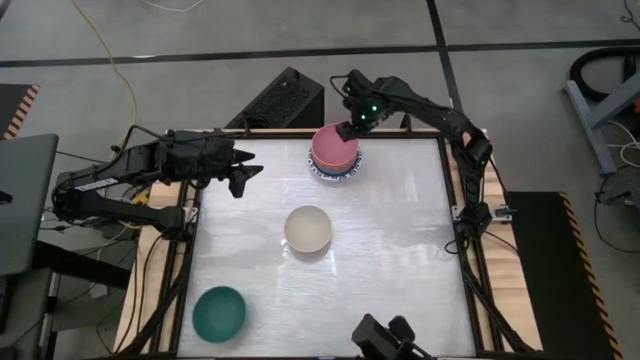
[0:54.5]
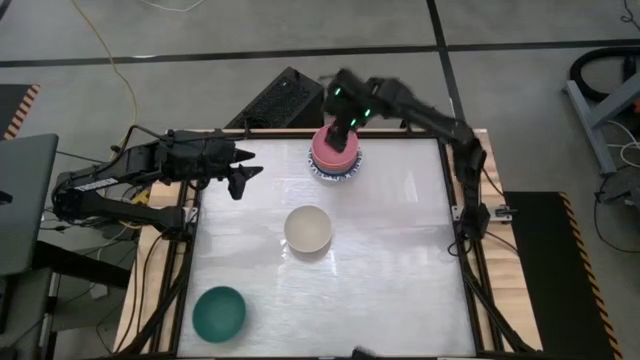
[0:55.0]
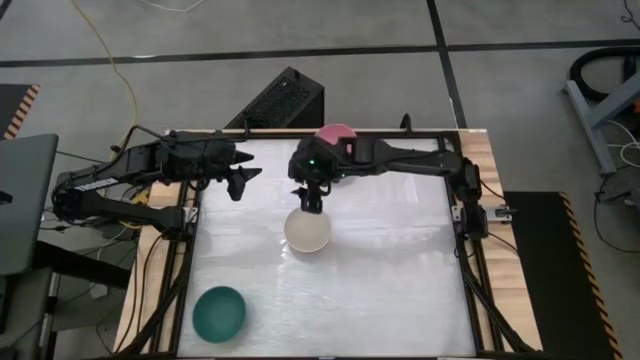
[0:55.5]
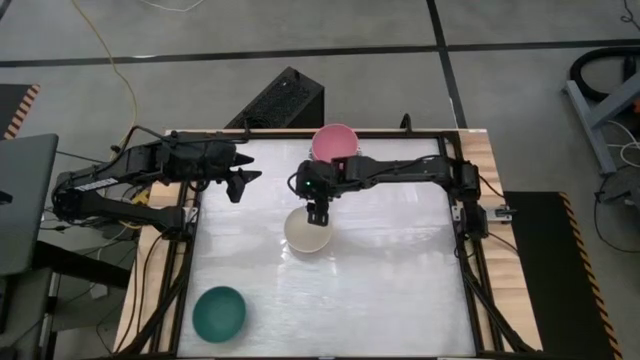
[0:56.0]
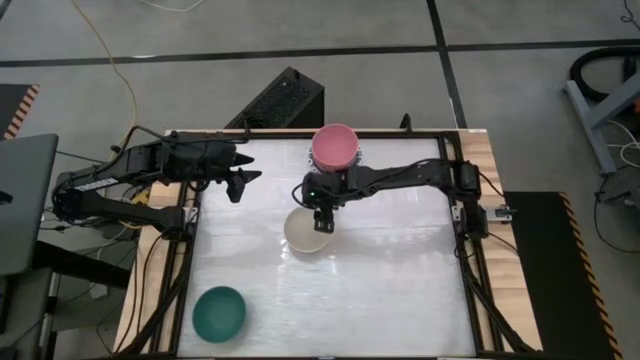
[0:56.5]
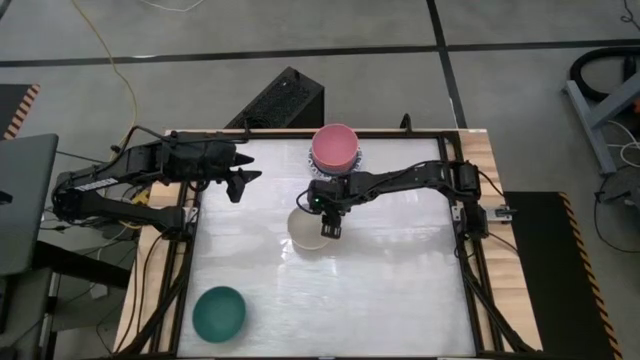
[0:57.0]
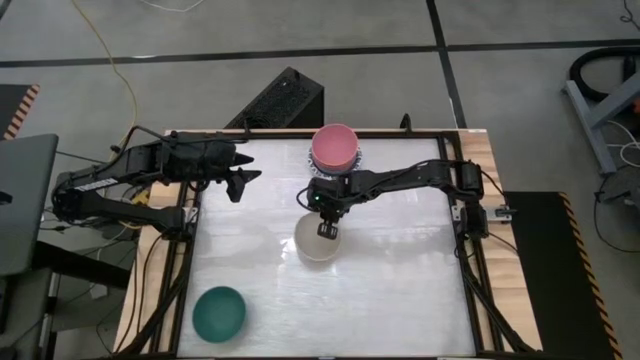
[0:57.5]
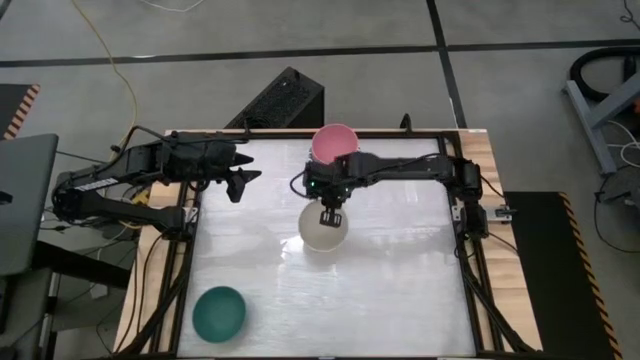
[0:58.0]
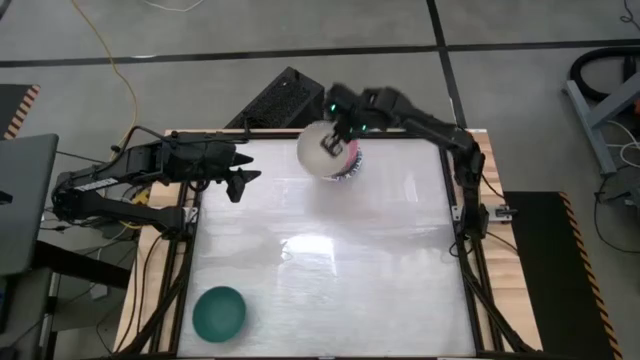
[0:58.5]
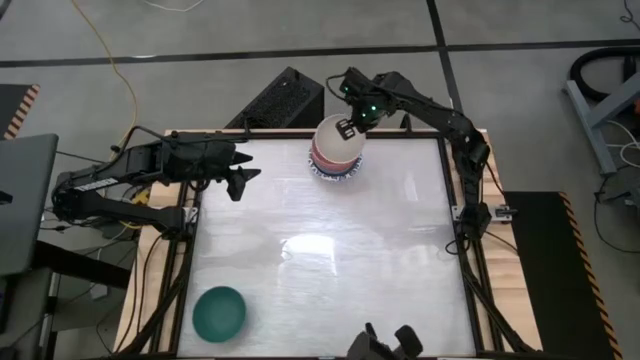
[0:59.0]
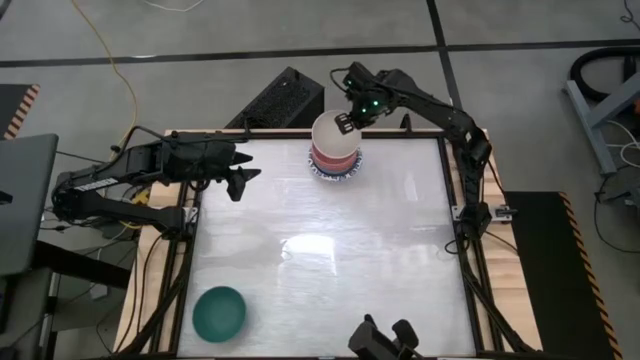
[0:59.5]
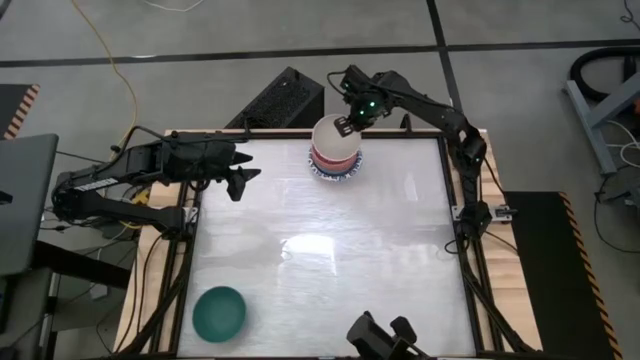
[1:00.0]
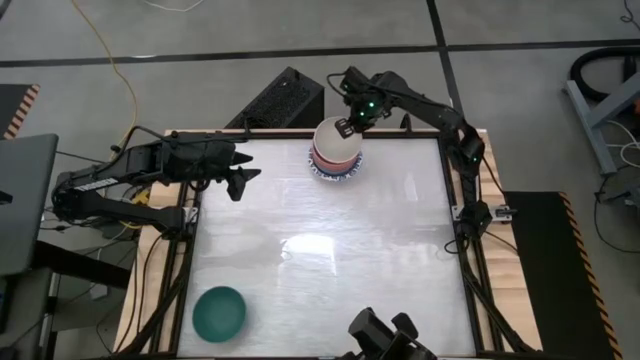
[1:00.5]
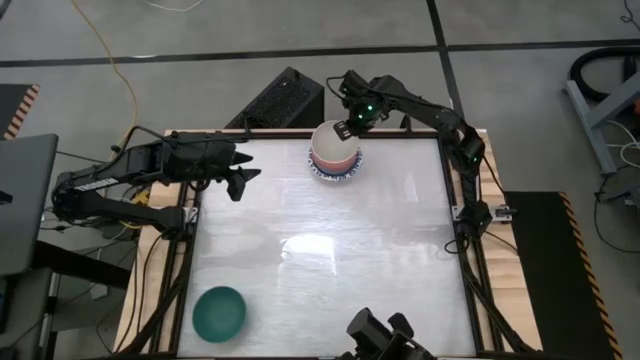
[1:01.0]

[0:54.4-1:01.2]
Stack the white bowl on top of the pink bowl

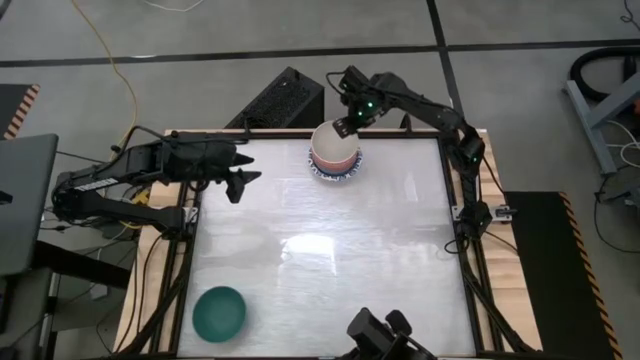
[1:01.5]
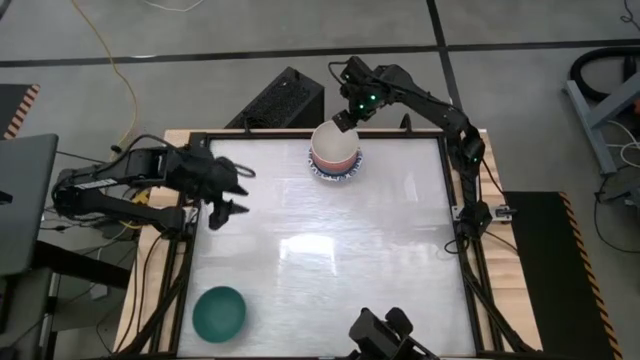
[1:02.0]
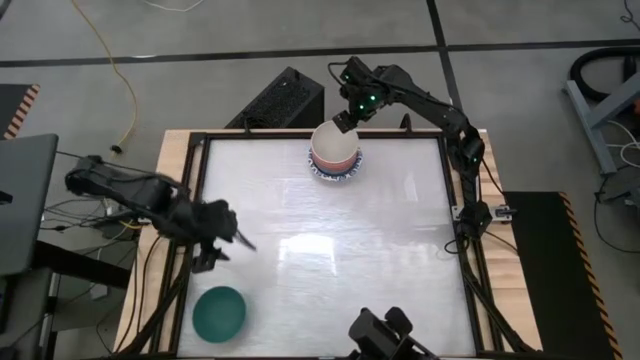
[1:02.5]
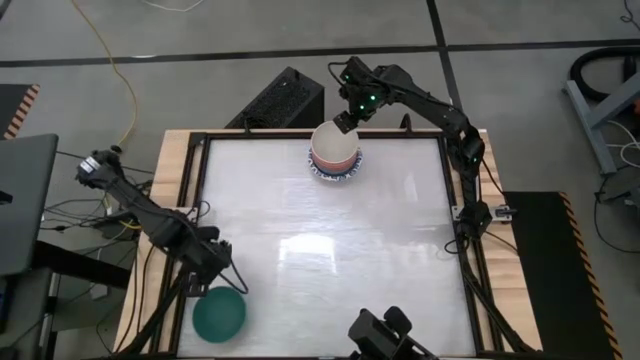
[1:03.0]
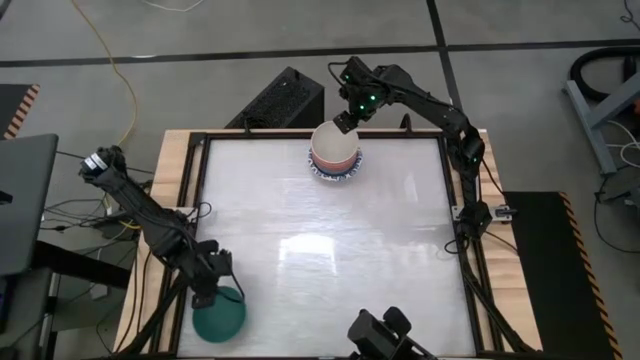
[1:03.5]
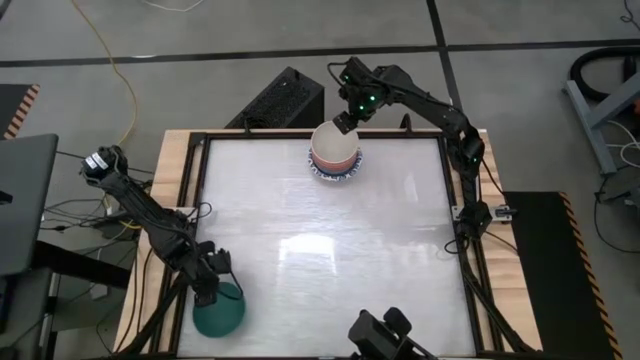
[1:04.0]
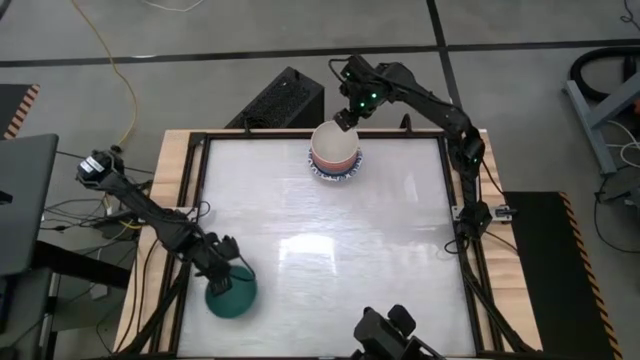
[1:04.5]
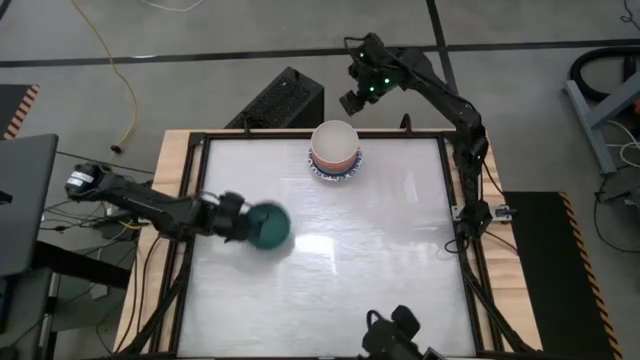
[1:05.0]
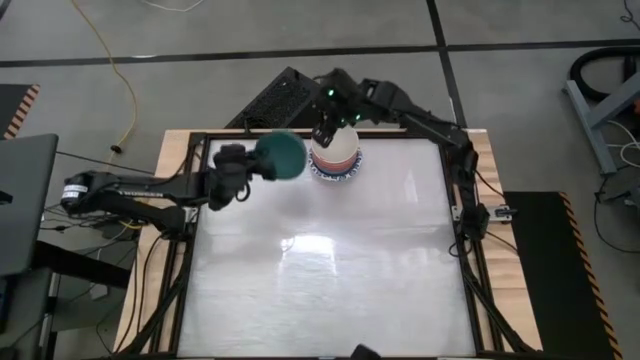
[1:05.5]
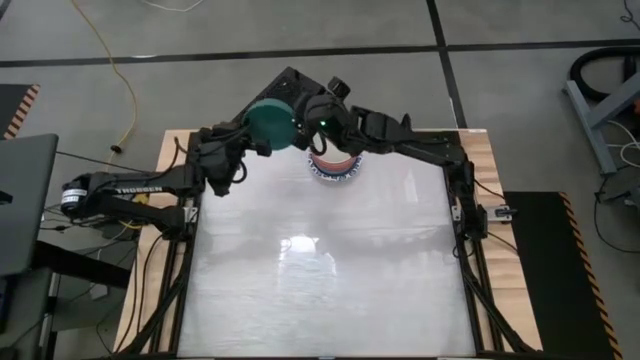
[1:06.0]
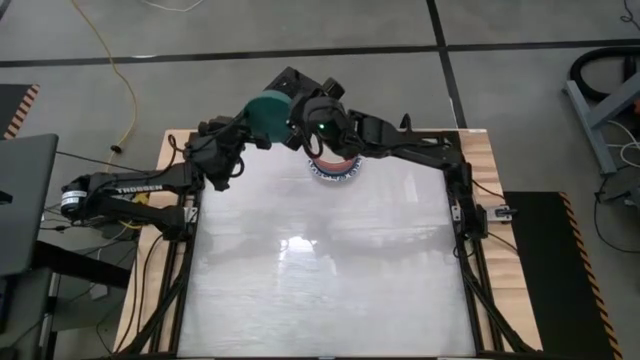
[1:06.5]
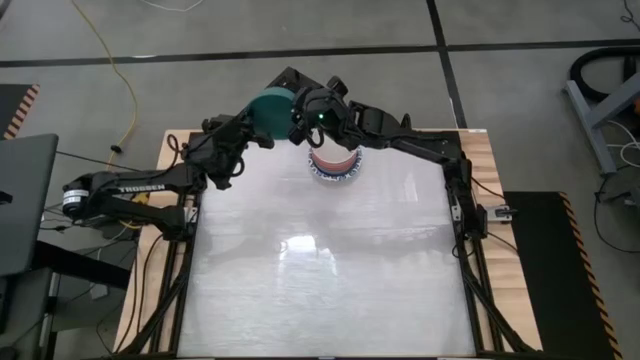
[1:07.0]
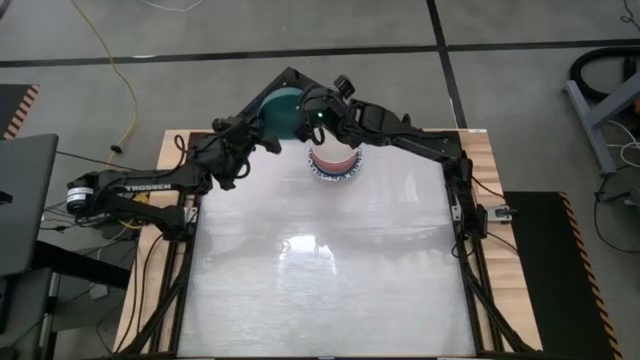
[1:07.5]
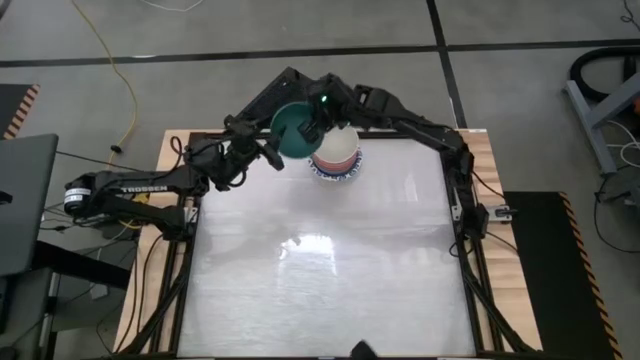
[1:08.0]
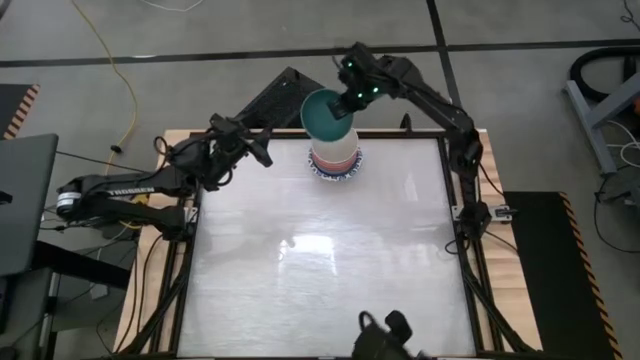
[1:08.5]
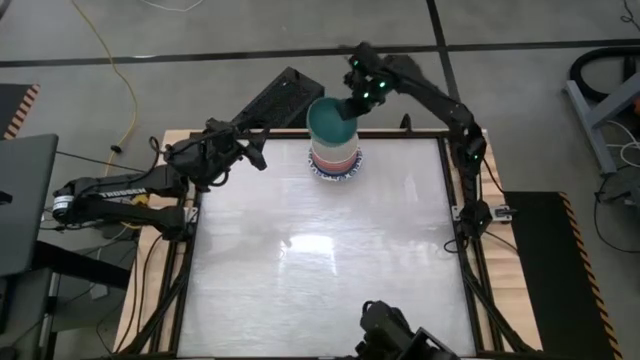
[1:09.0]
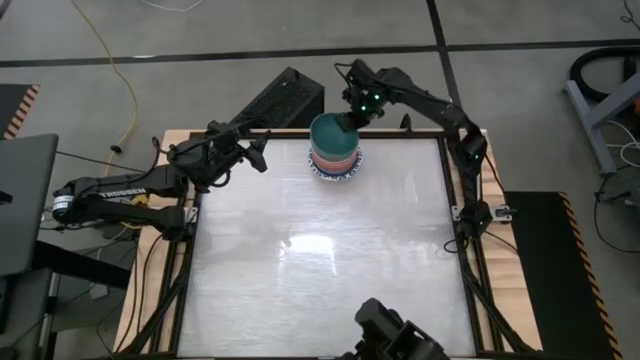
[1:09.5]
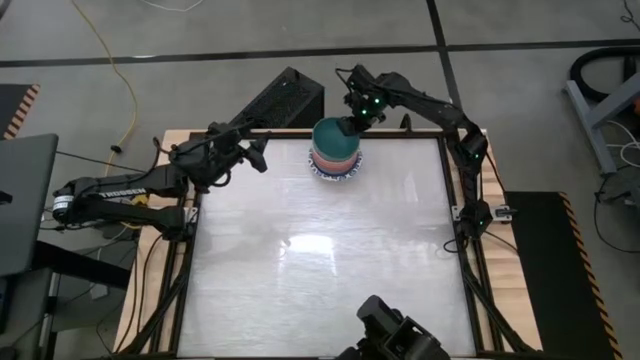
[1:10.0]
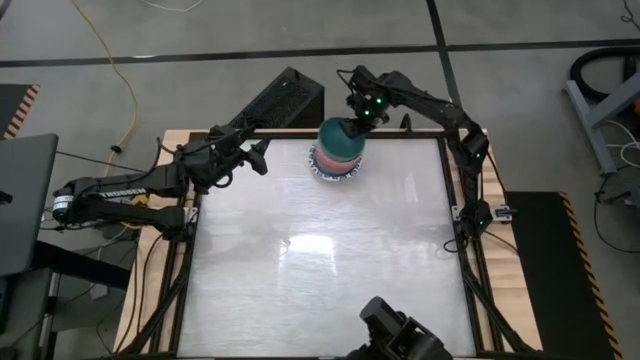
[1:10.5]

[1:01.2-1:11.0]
Stack the green bowl on top of the white bowl

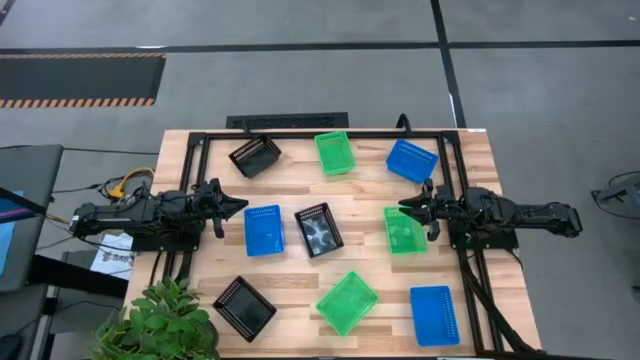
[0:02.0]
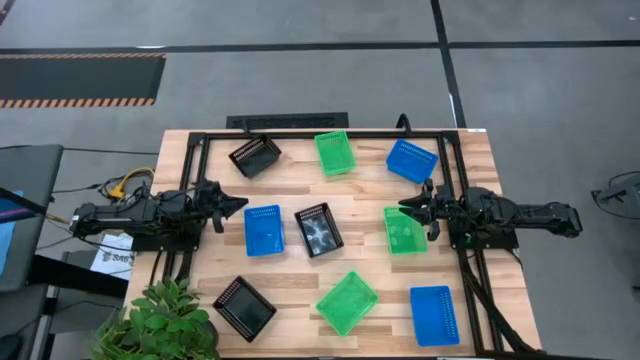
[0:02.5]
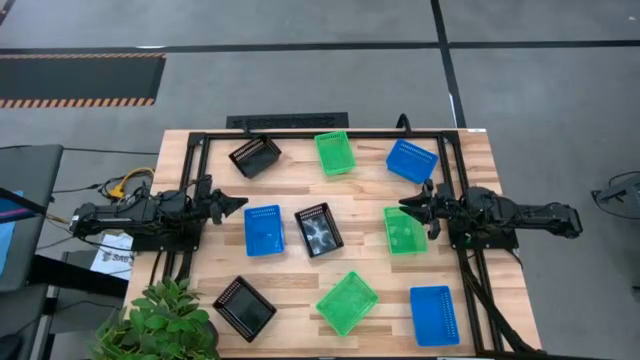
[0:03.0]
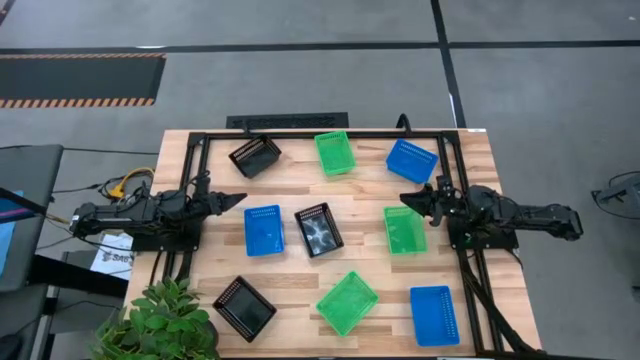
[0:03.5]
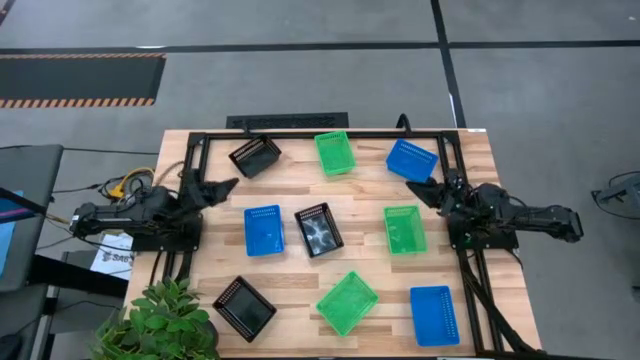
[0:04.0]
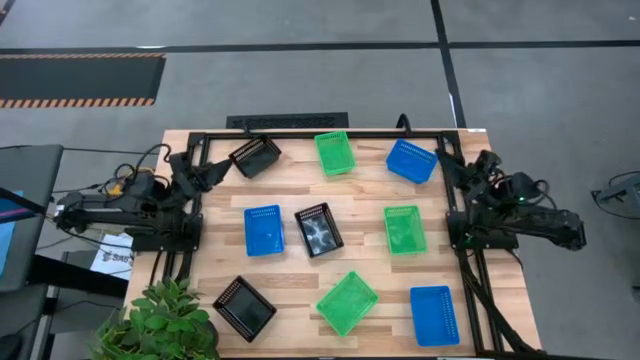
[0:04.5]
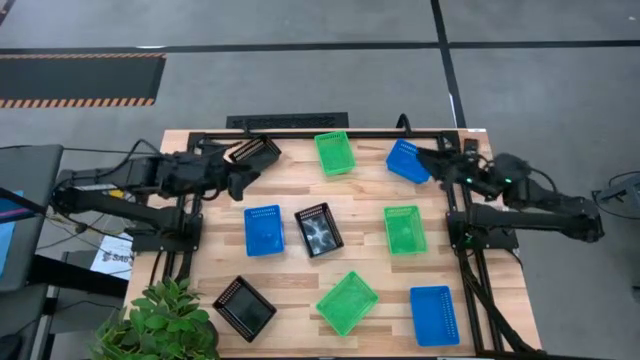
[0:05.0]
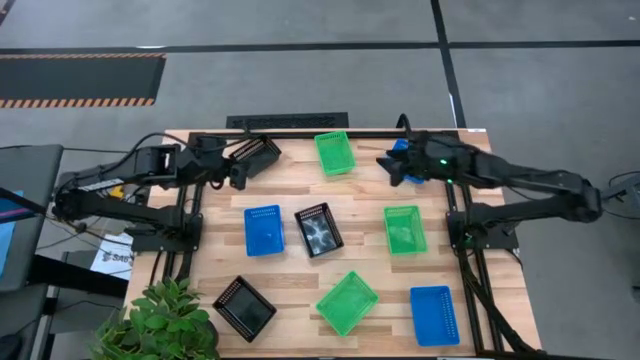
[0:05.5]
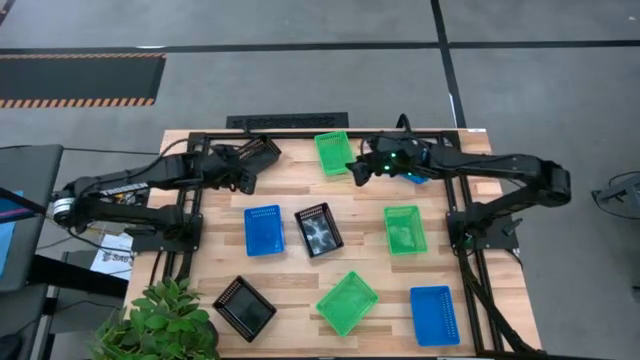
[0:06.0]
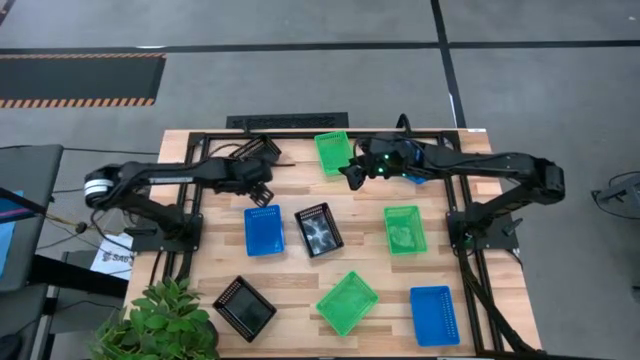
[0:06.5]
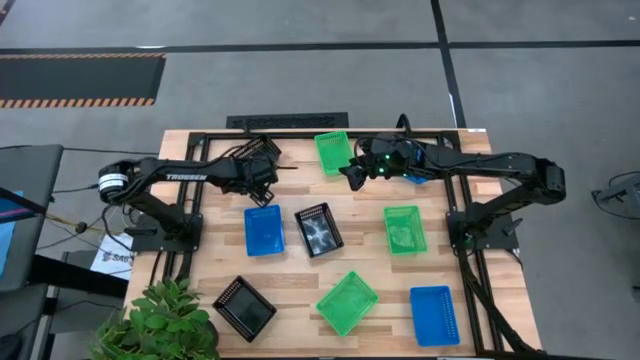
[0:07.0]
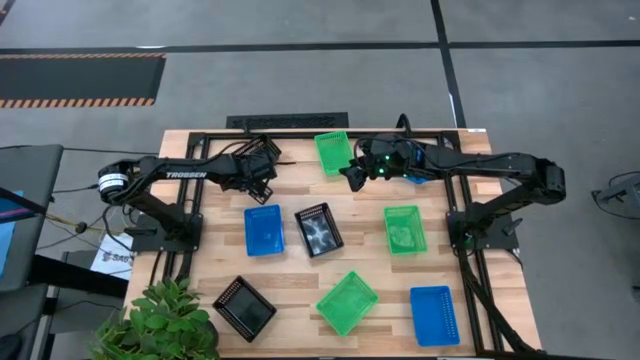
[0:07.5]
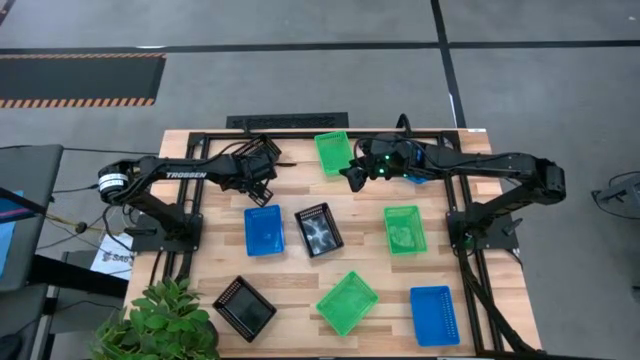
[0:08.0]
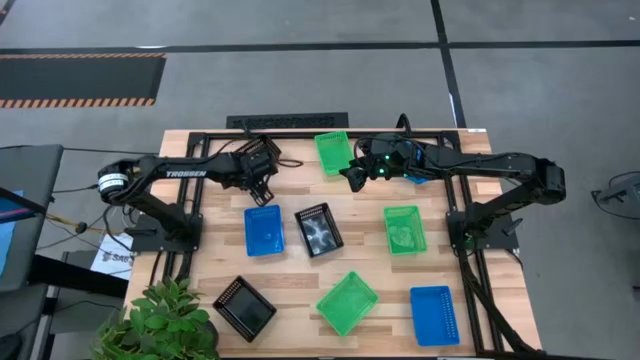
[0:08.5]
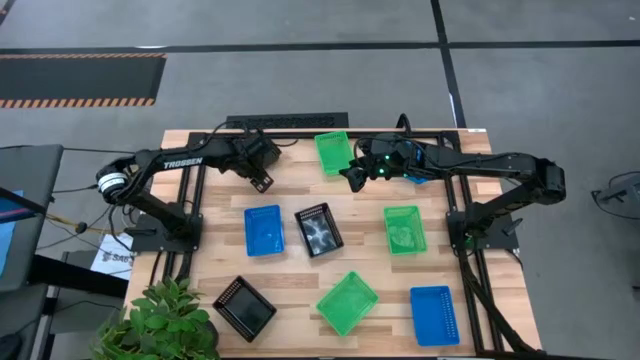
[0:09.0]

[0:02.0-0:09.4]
Adjust the top black bin
